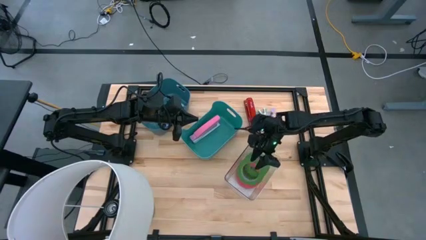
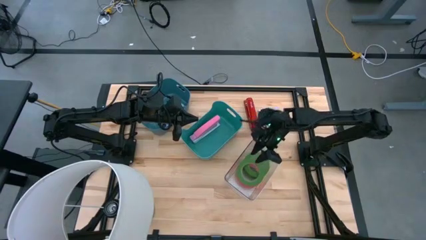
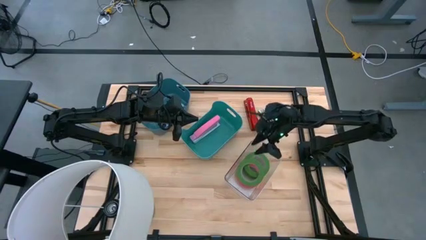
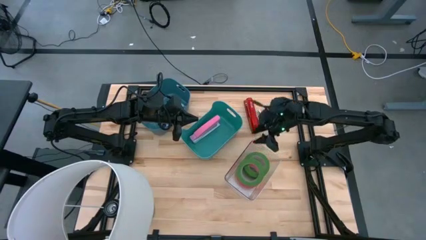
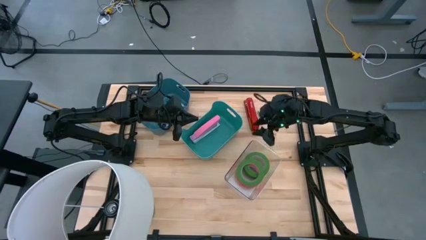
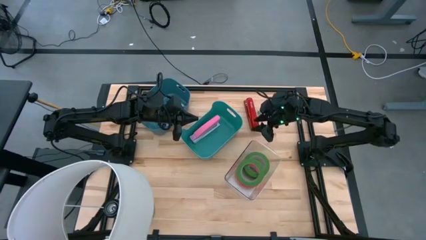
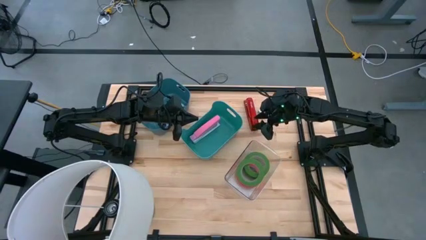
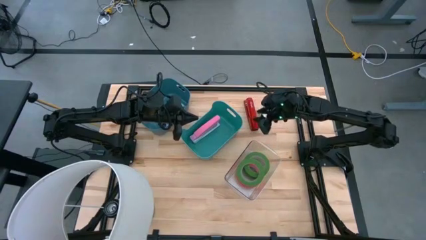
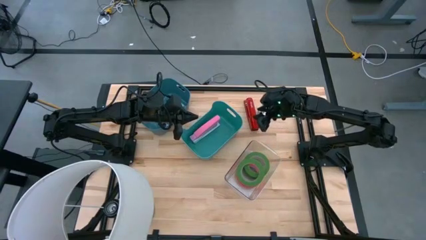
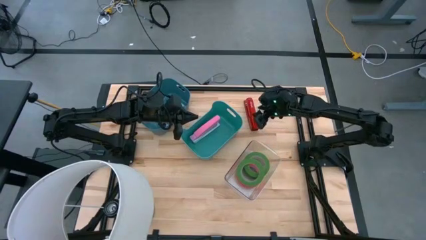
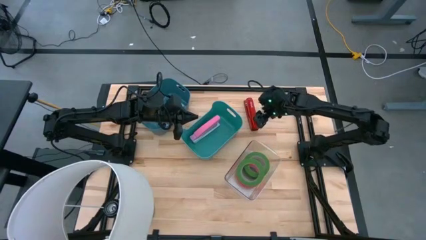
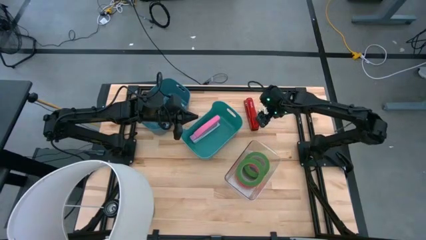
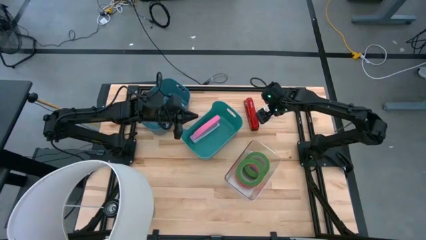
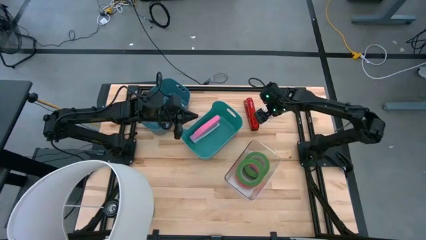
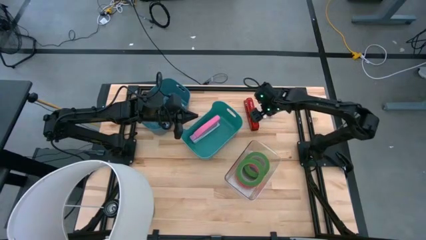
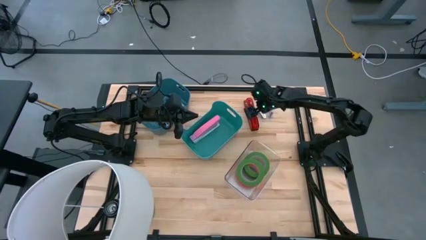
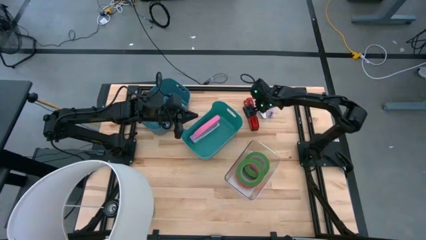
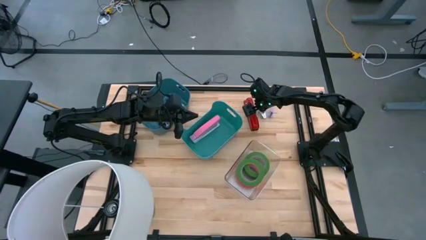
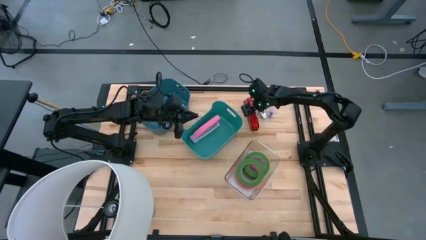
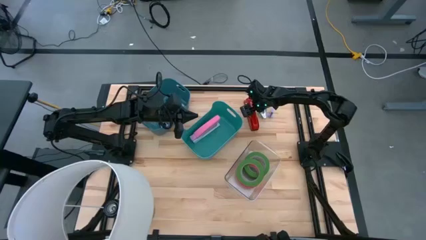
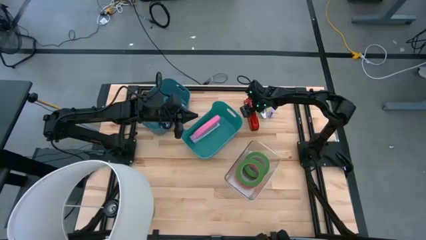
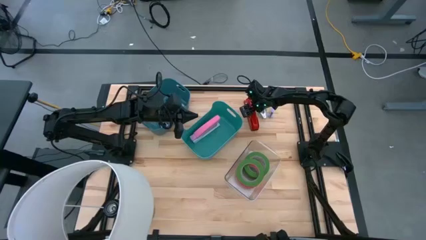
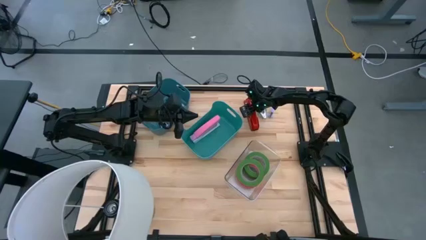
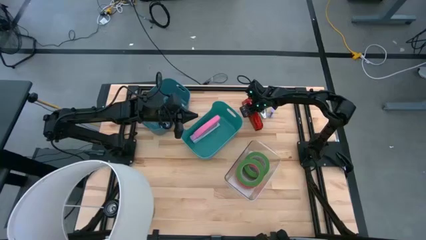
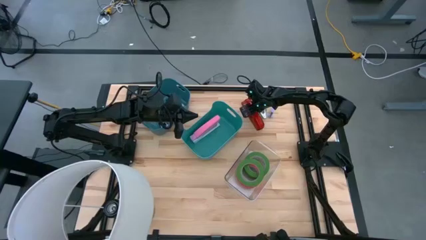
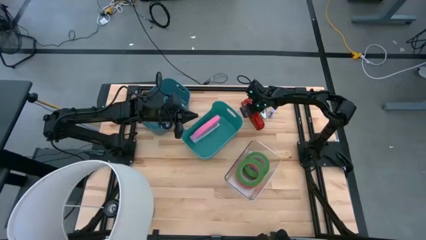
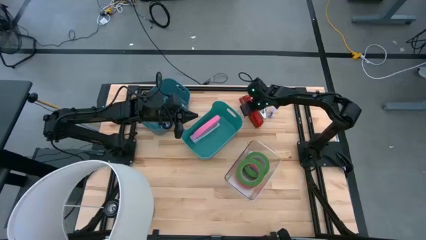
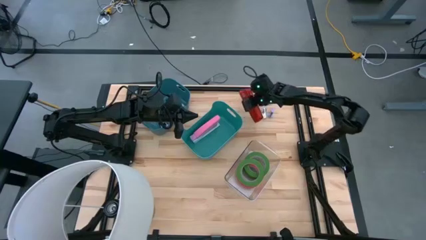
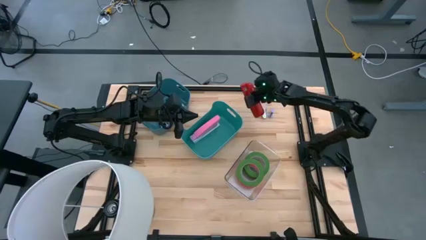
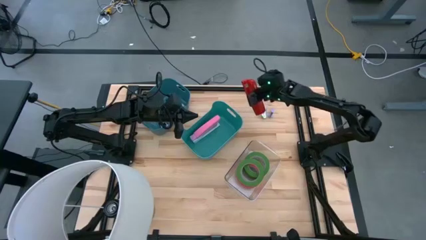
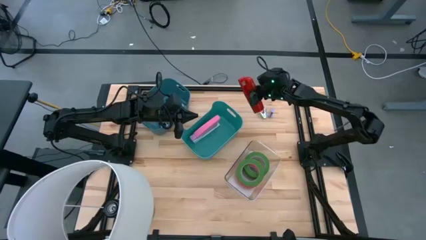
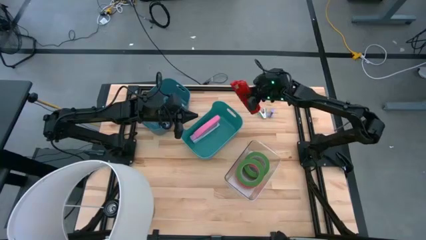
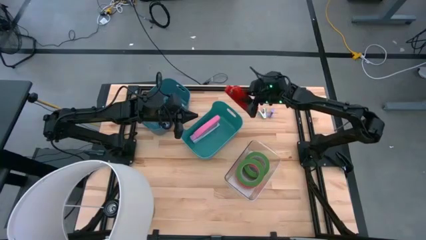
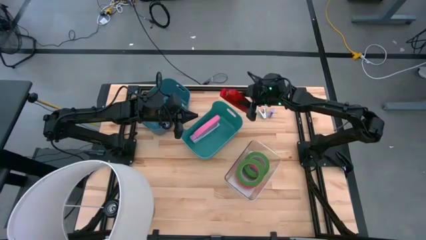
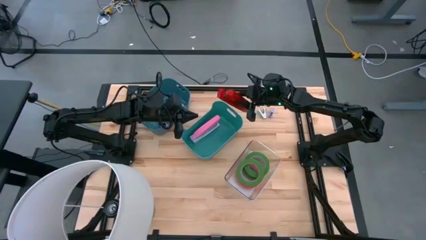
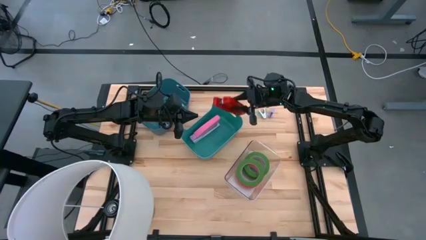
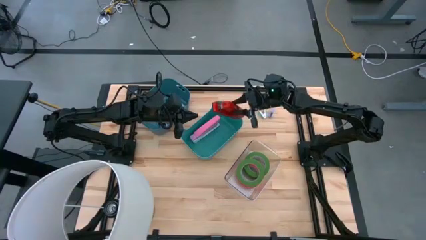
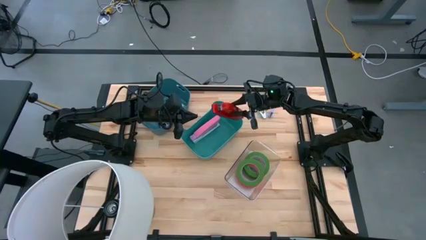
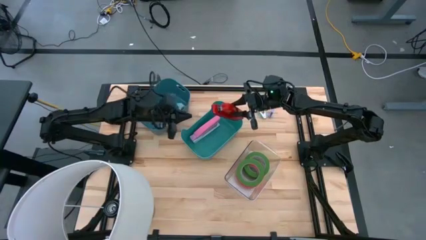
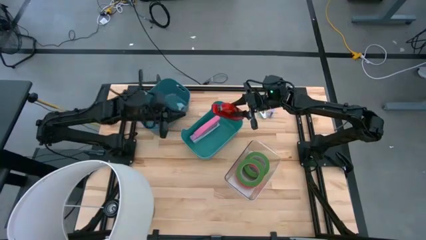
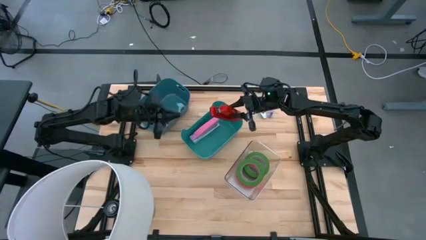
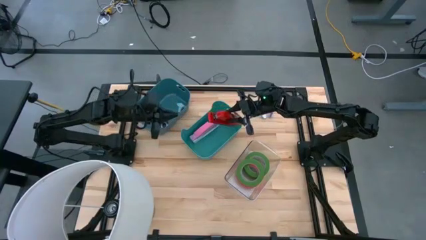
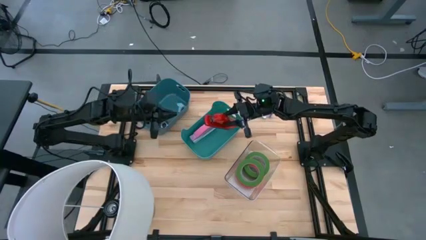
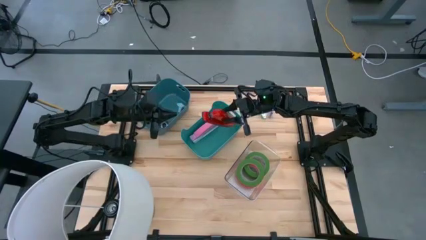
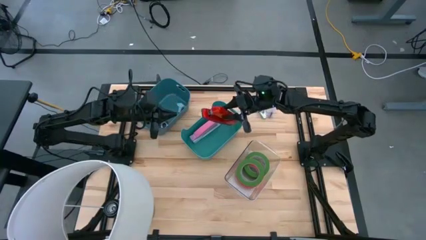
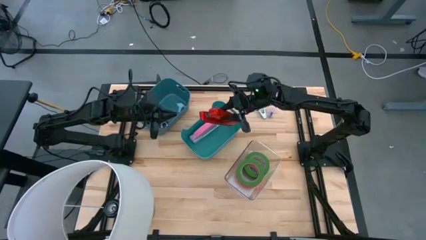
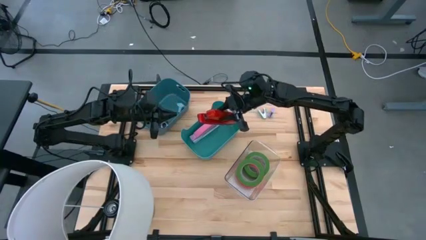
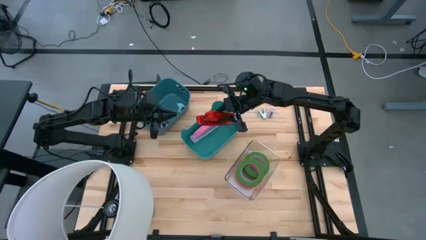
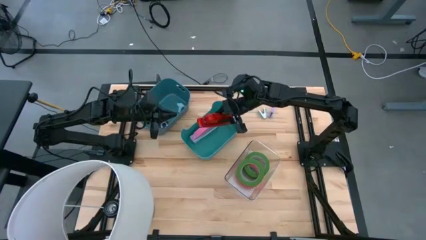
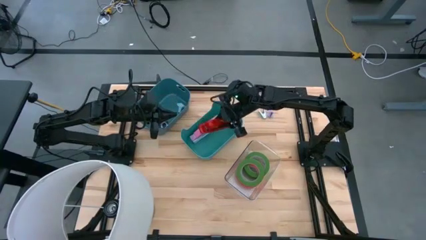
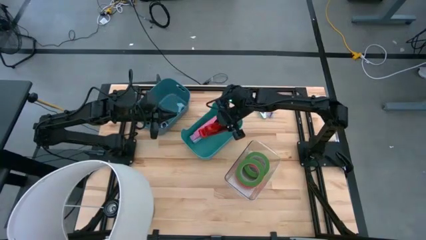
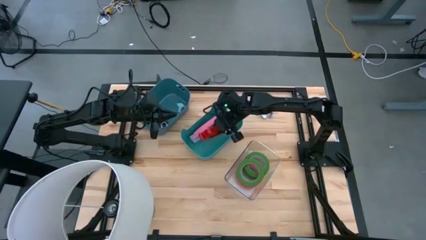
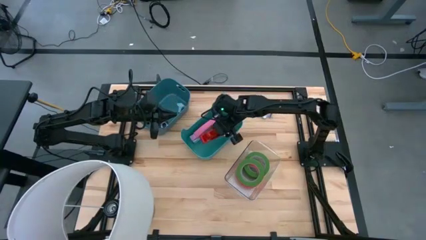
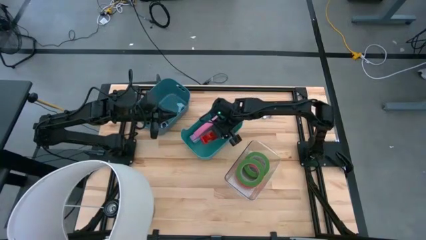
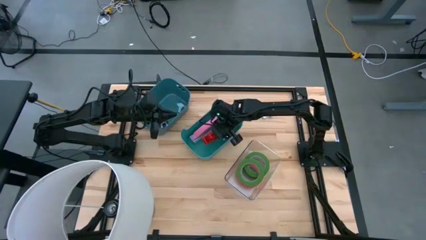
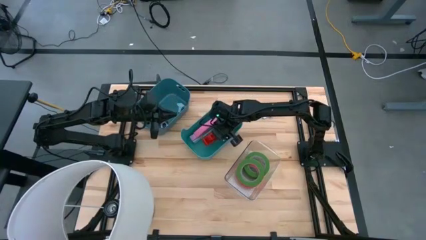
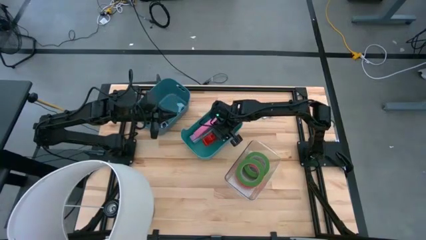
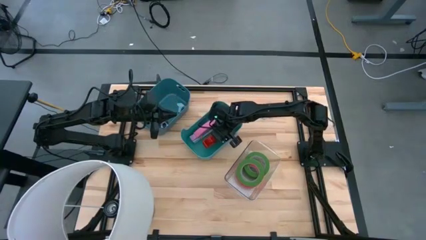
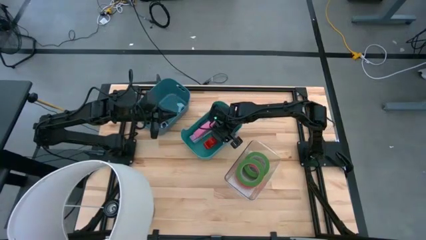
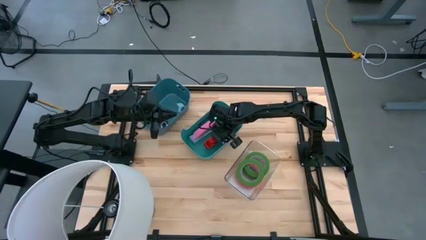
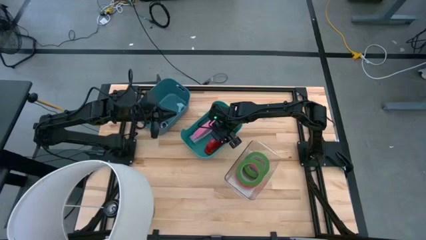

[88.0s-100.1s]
Task: Pick and place Stapler, Stapler remover, tape
Put the red stapler into the green bin
